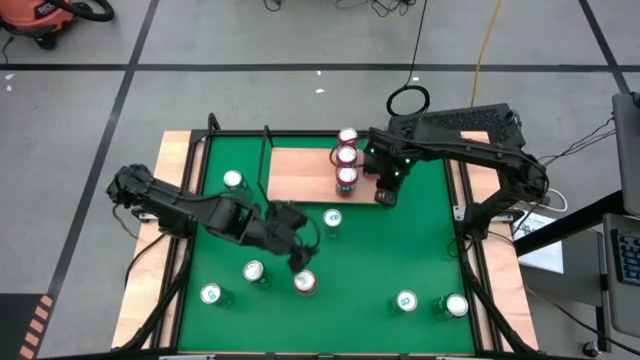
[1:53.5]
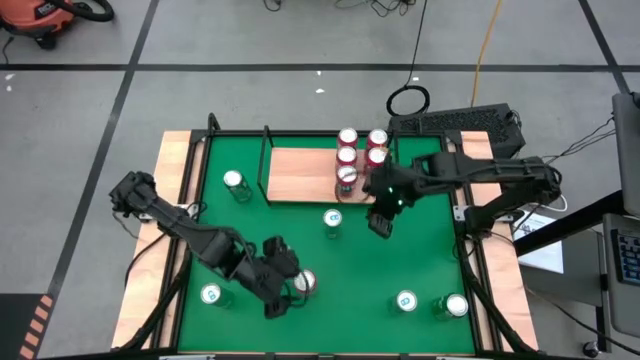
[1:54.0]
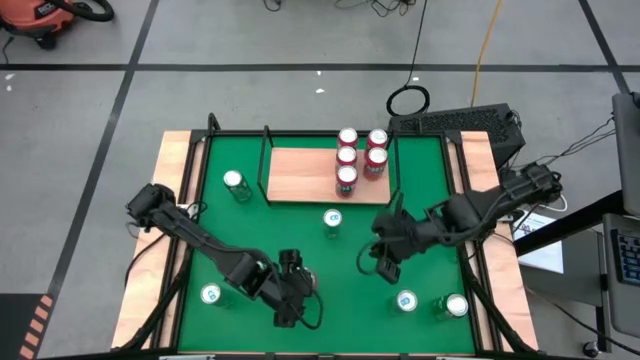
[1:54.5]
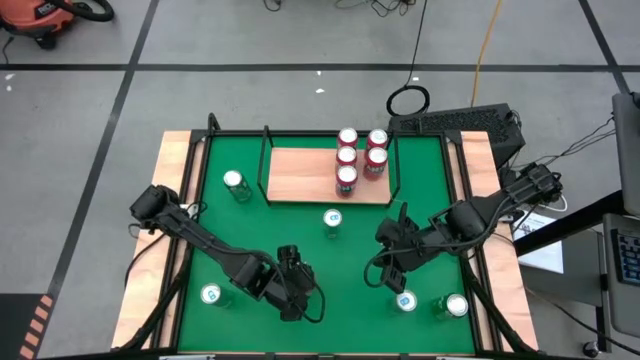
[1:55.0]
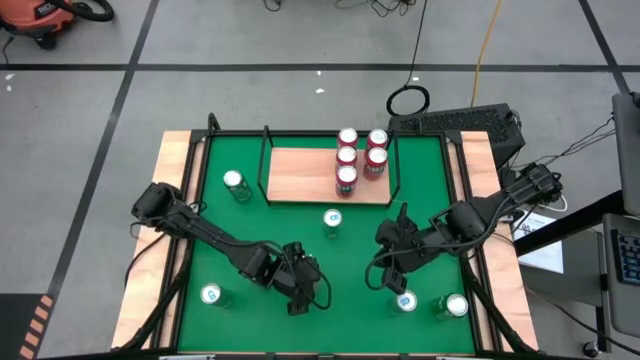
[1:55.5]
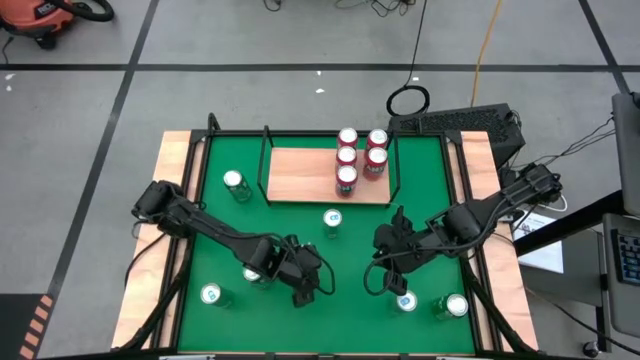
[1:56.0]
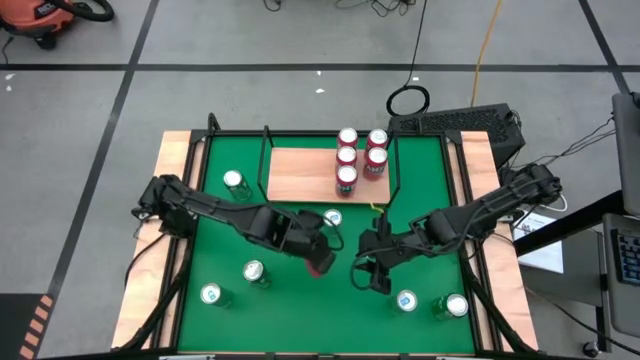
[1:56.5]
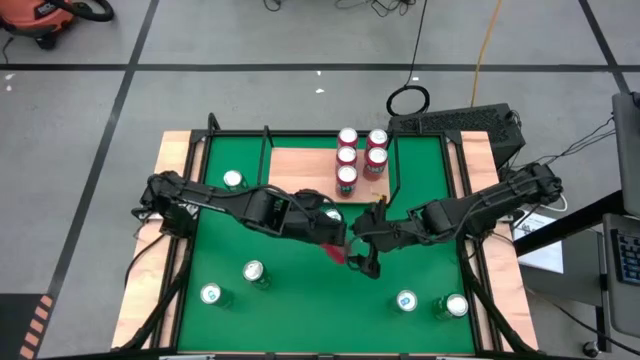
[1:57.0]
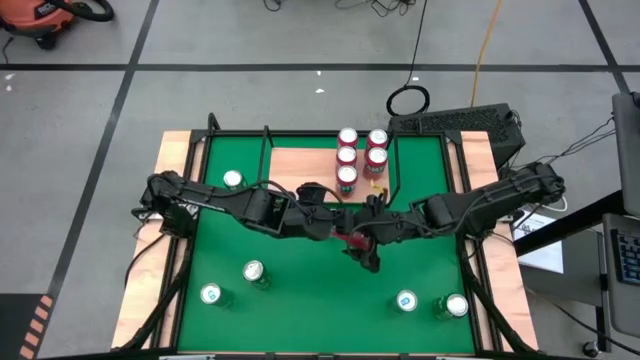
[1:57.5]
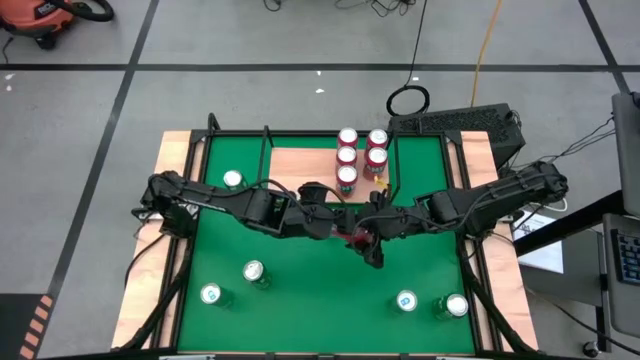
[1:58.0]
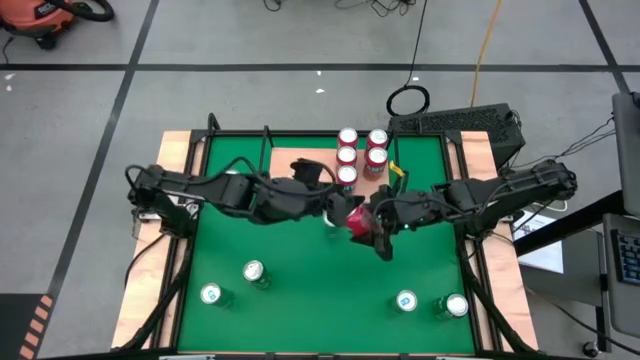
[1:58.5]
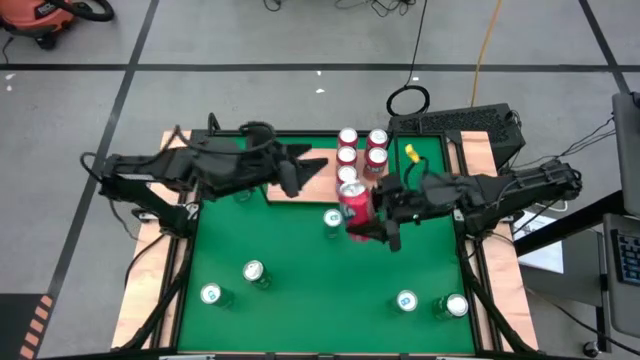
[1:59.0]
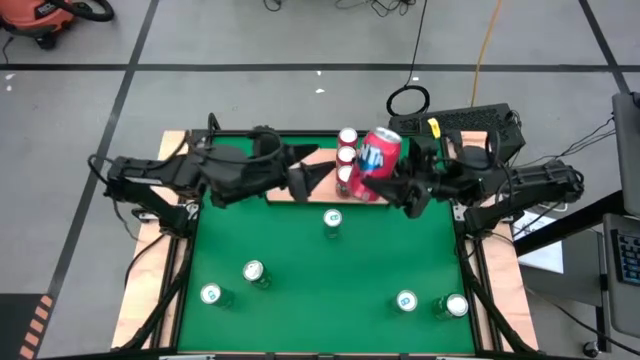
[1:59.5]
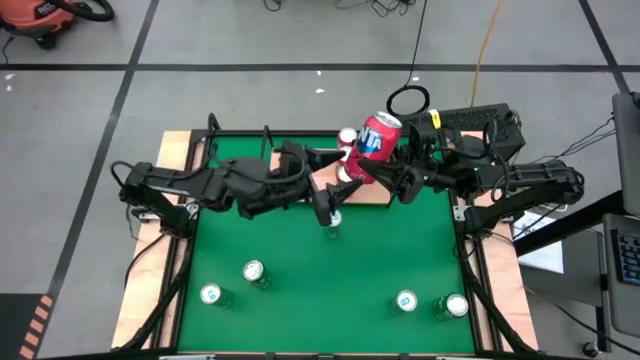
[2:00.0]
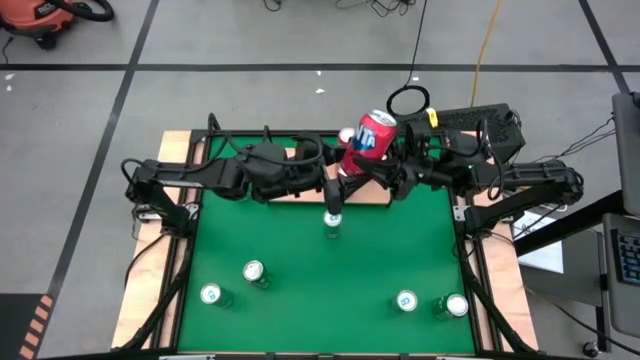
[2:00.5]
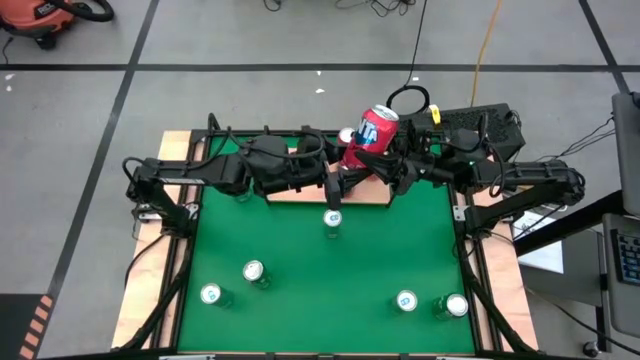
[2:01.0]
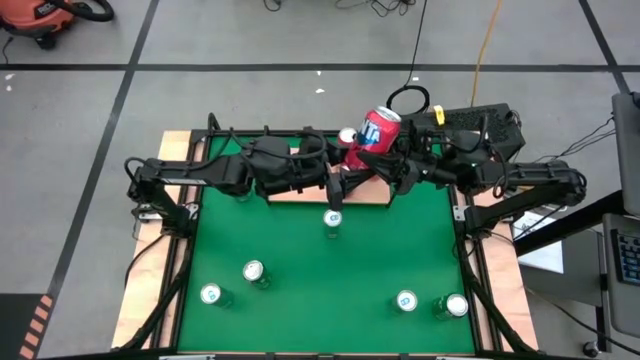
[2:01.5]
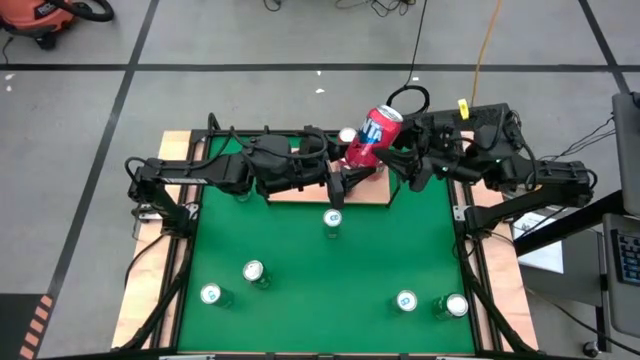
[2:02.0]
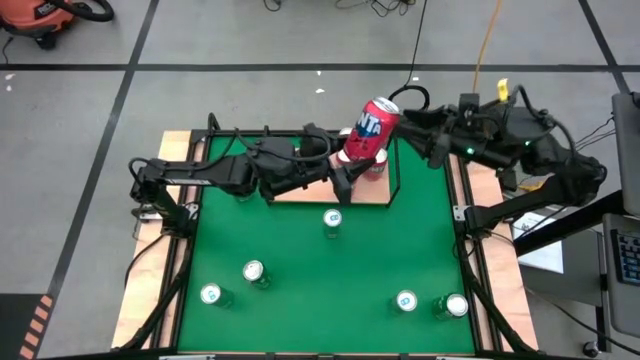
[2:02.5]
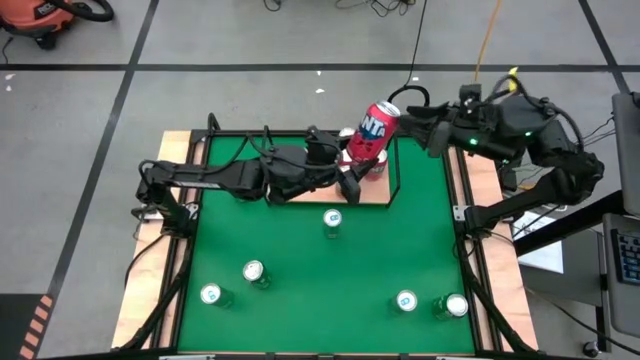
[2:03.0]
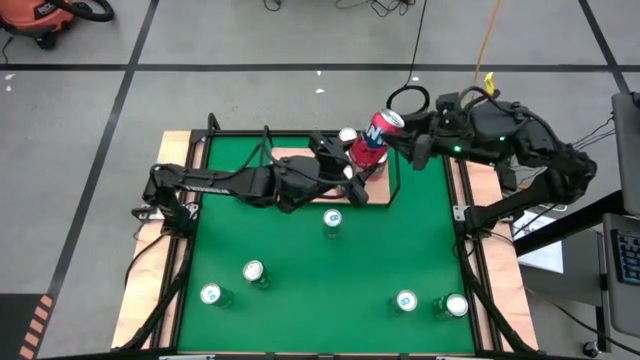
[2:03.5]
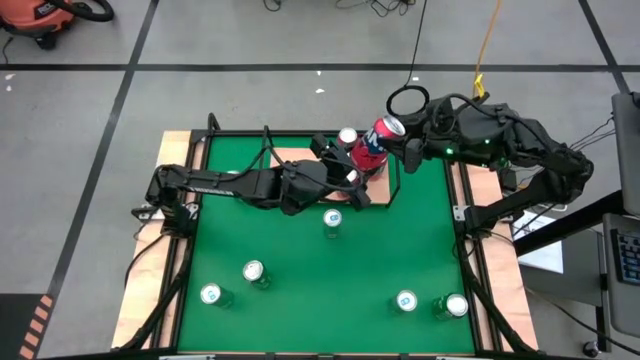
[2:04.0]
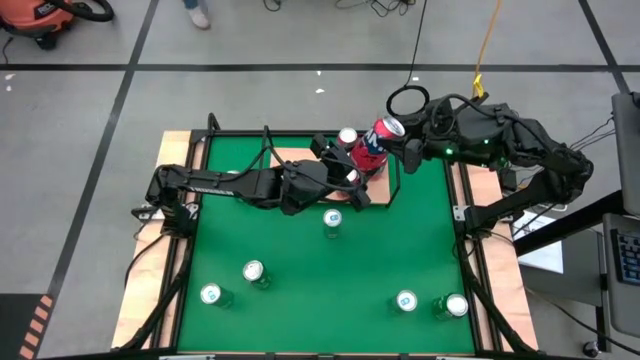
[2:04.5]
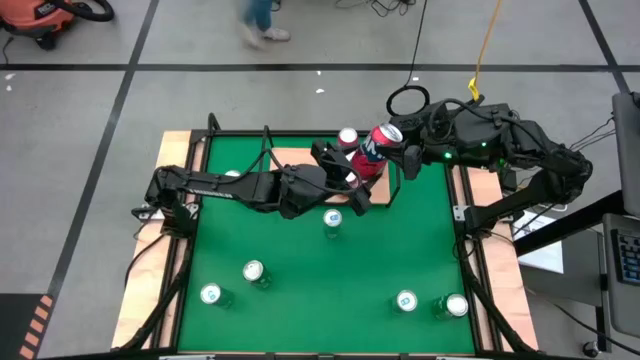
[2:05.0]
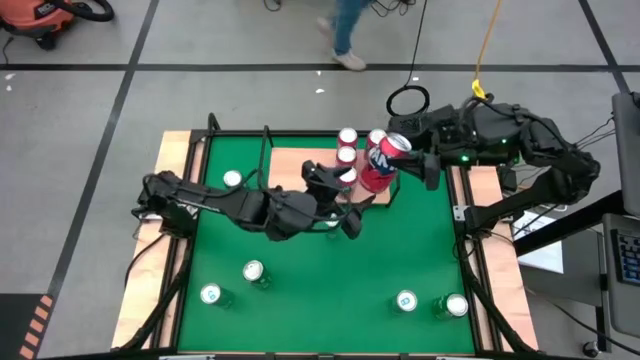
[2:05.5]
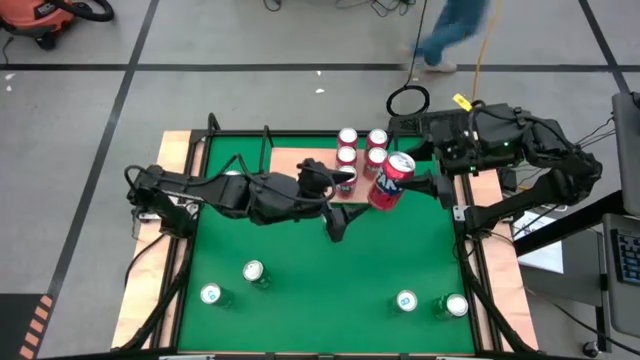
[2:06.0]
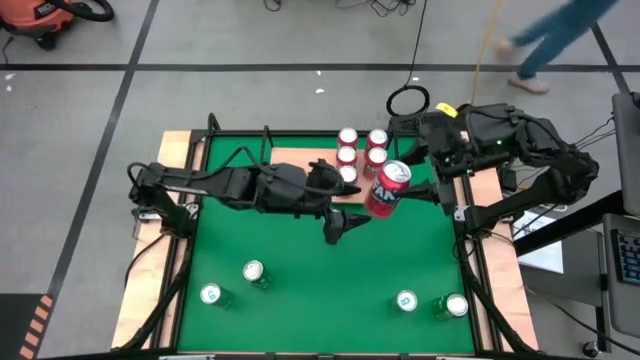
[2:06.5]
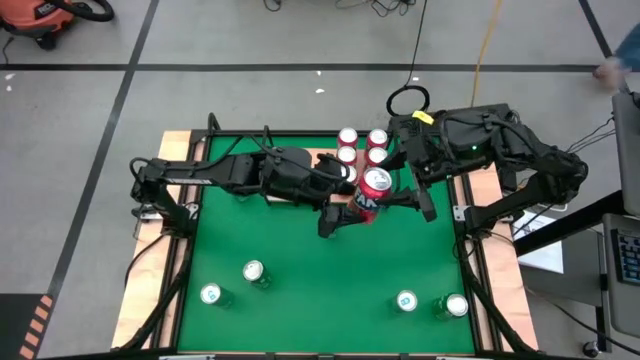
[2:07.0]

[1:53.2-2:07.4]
Task: Place canned beverage on shelf
Put the red soda can on the shelf aligned with the other red soda can on the shelf

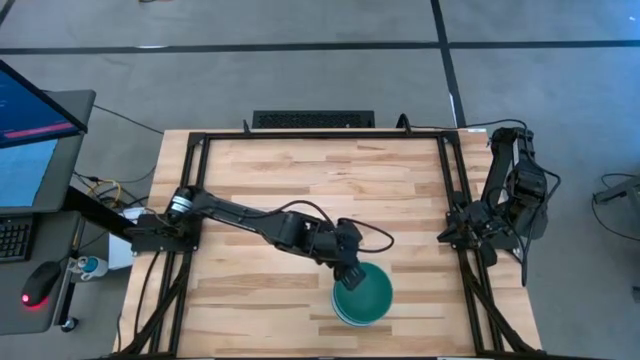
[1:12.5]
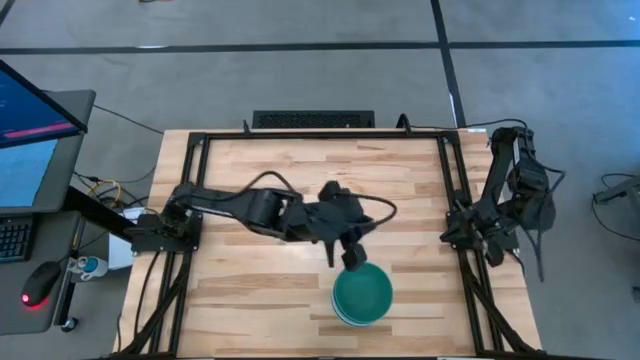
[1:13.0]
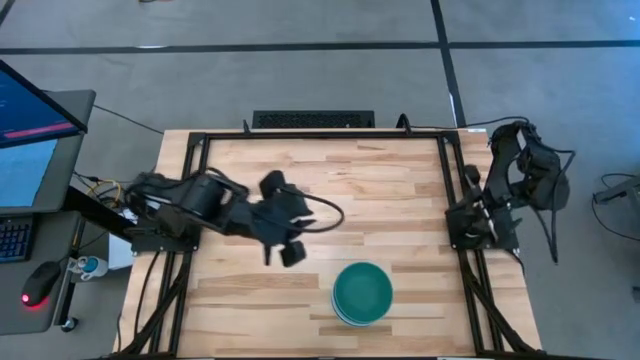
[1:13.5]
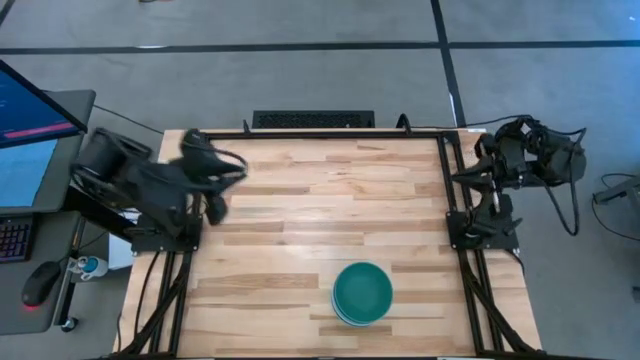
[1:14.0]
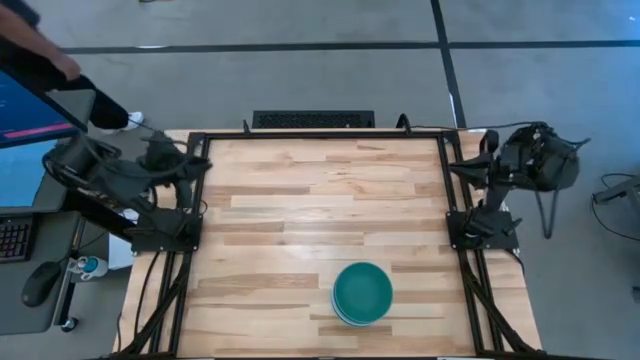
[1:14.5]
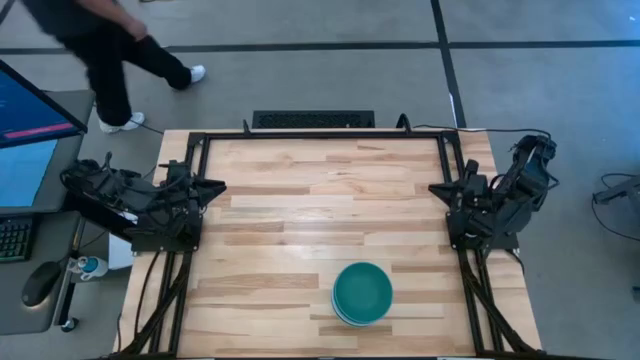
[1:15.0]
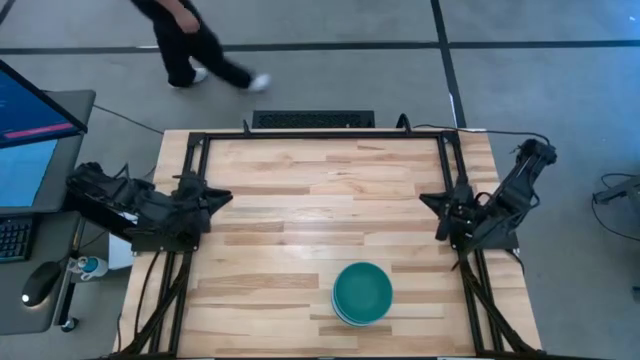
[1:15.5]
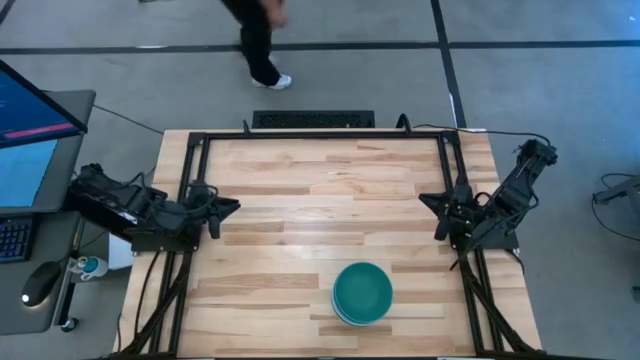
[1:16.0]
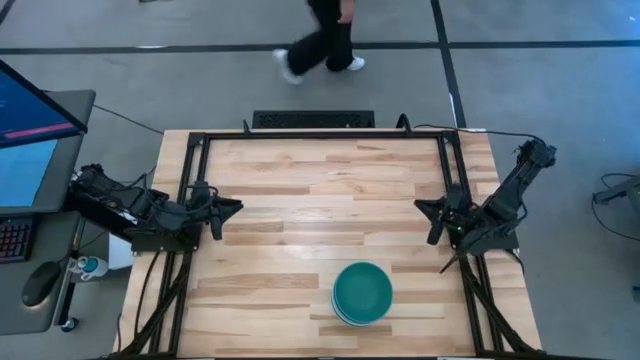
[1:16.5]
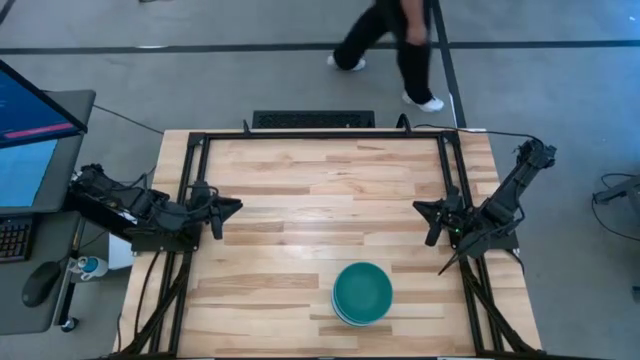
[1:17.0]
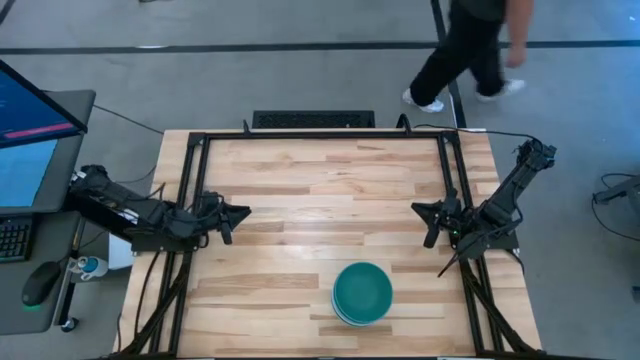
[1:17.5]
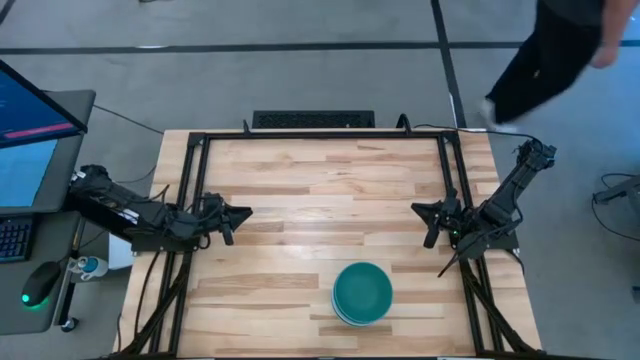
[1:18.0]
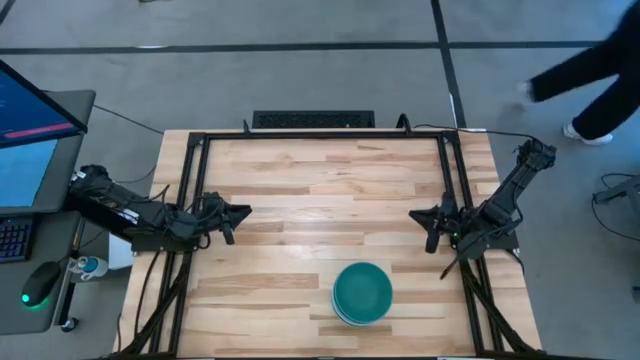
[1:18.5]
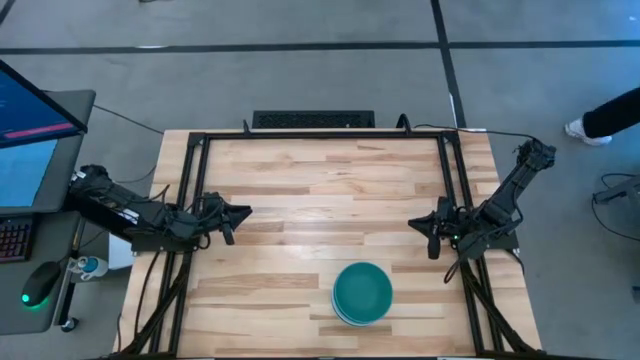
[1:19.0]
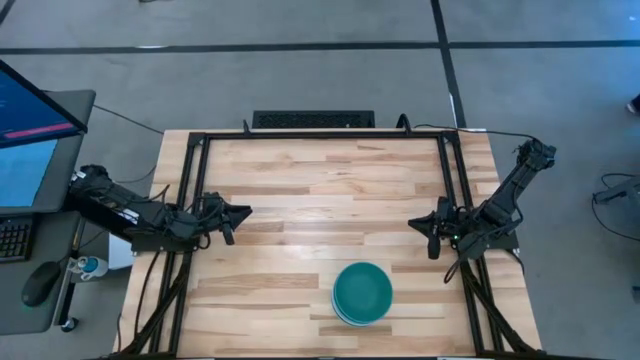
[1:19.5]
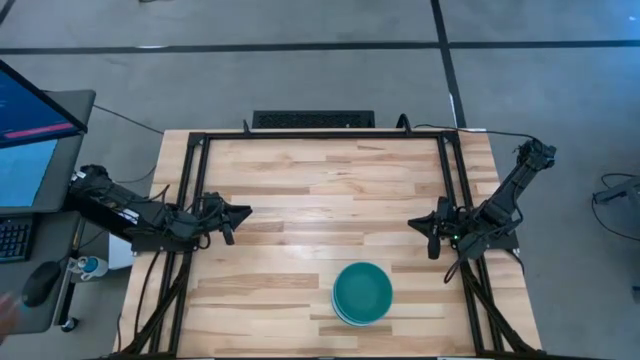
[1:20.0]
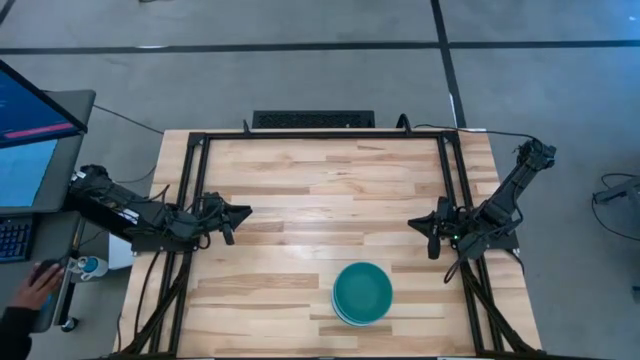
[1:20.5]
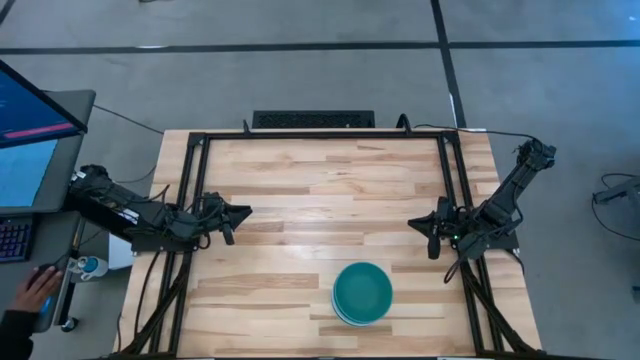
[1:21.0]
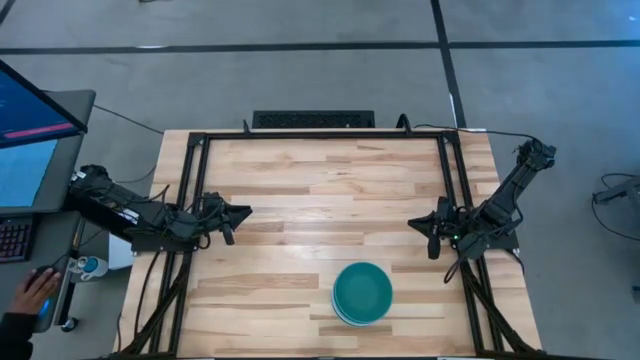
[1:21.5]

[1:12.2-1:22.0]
Task: Nest bowls inside each other
Return to Home Position
